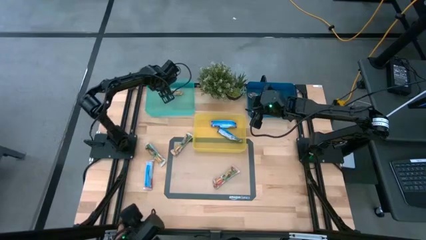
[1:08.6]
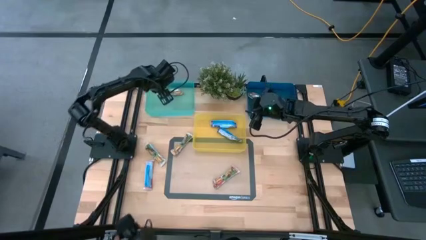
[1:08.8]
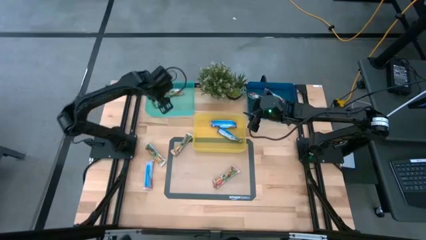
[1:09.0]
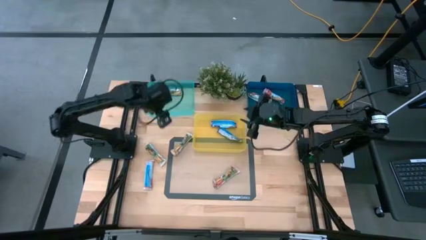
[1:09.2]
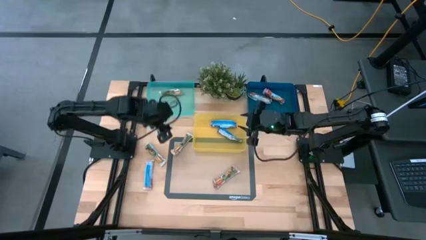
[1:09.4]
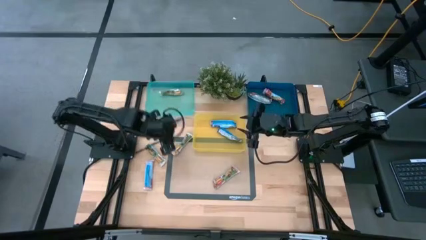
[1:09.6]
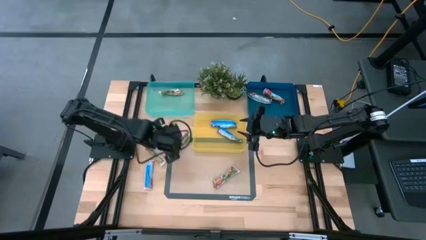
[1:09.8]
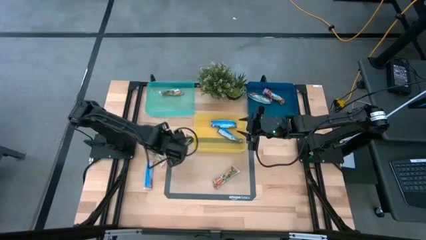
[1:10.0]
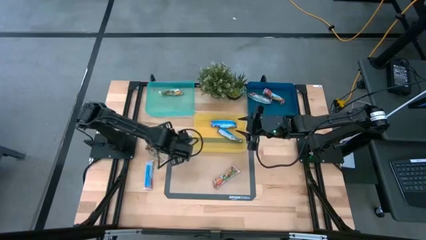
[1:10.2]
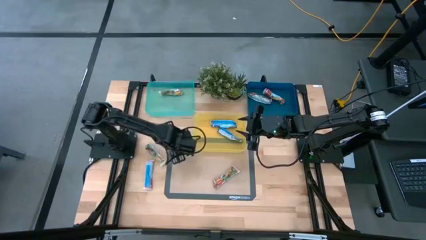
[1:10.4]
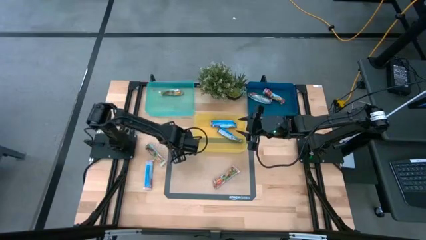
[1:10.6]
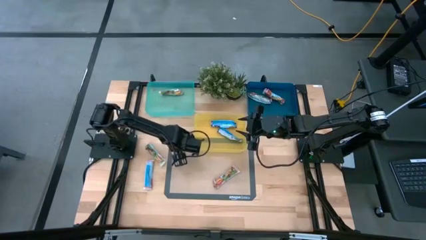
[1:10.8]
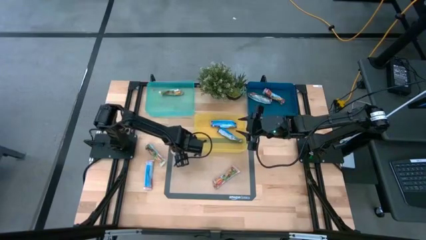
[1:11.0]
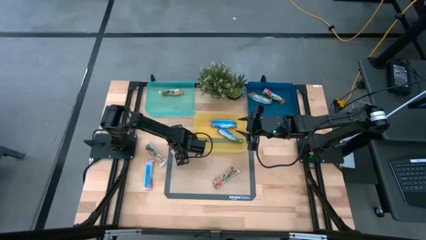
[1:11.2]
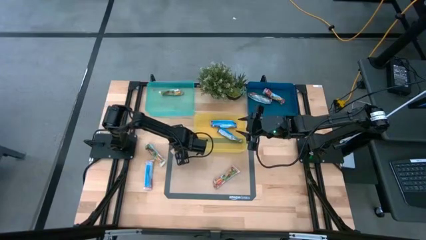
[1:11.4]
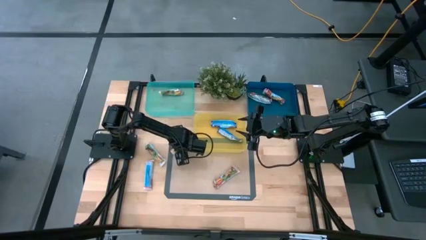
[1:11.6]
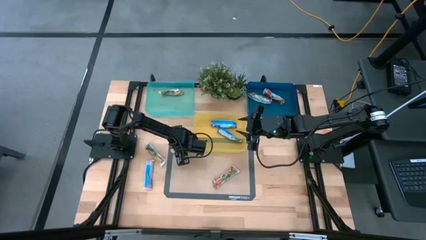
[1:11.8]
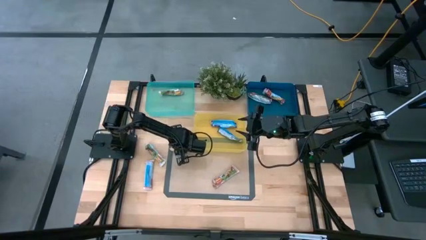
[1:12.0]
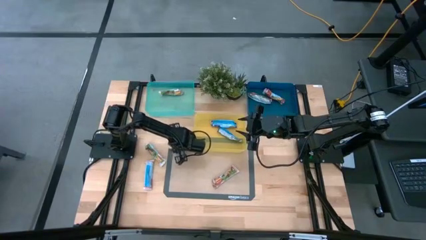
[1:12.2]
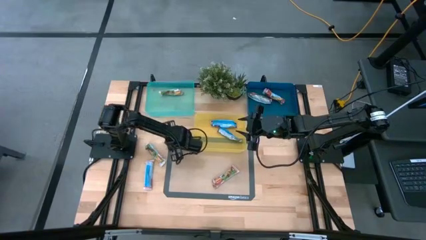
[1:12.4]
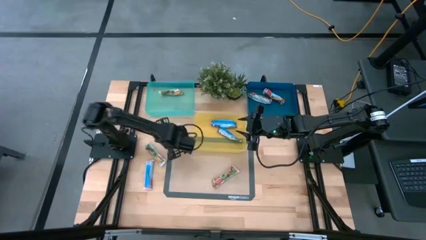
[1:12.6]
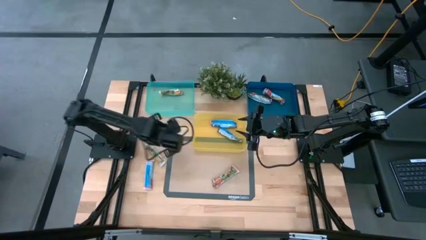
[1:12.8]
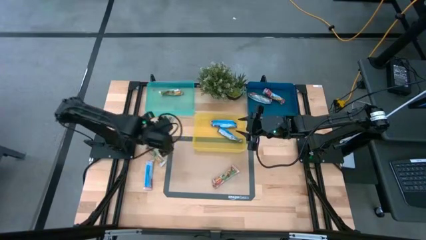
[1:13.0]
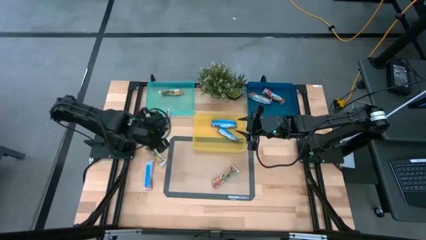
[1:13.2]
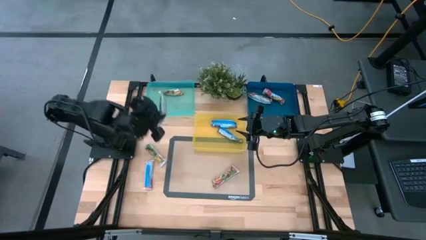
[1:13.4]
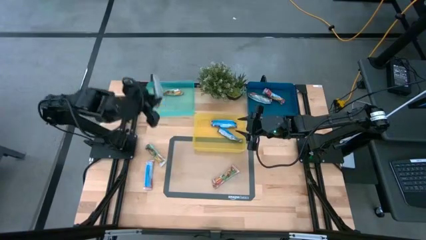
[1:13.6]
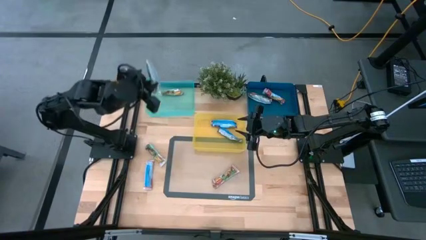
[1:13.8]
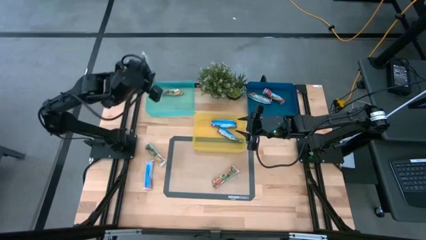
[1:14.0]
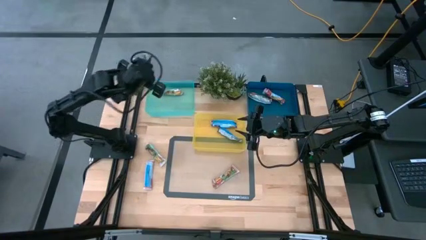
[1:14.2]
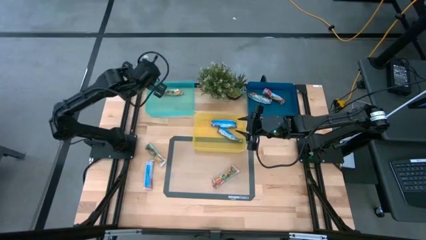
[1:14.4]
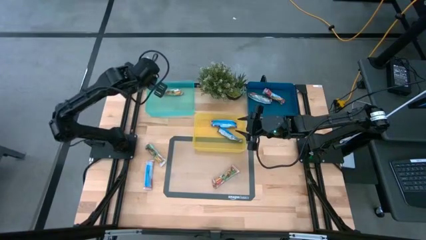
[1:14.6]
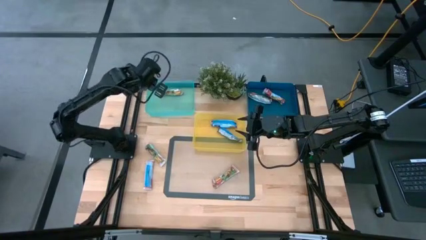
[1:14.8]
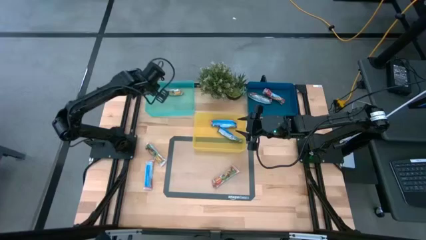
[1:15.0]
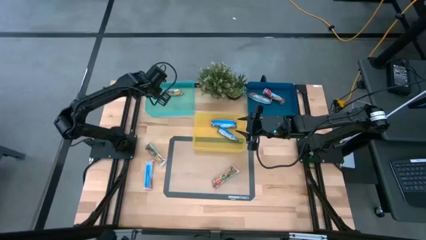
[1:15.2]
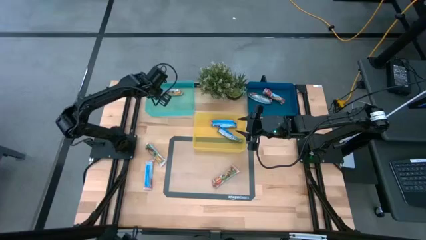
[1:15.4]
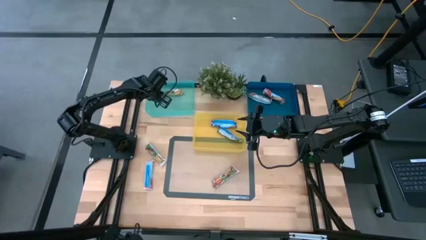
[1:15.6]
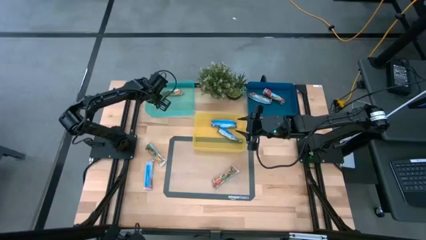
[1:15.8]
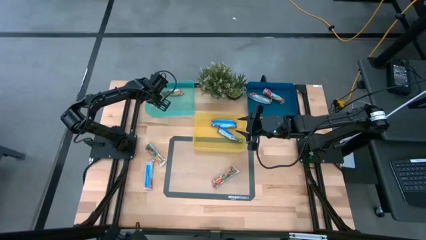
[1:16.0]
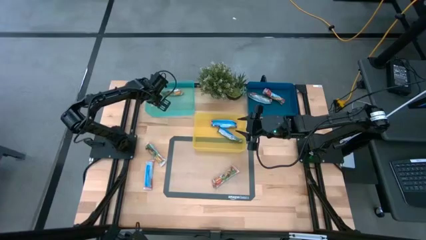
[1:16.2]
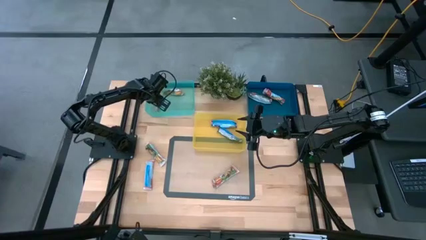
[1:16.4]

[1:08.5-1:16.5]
Task: Pick and place Granola Bars by type
Put the orange granola bar into the green bin

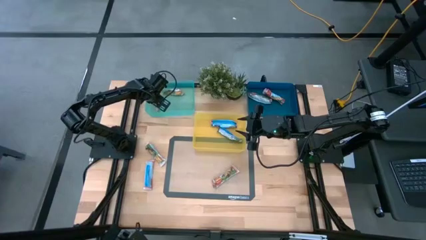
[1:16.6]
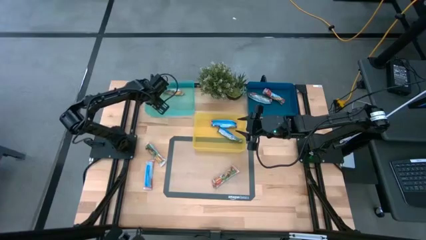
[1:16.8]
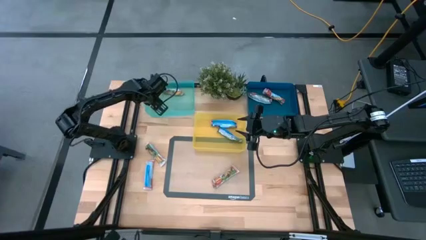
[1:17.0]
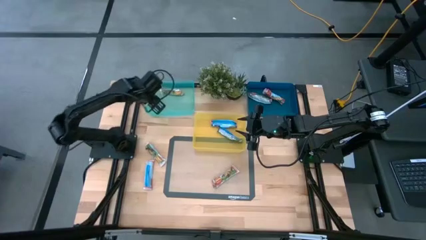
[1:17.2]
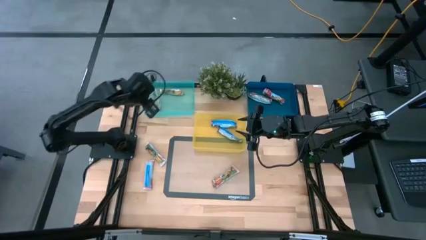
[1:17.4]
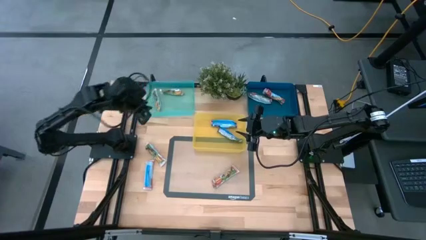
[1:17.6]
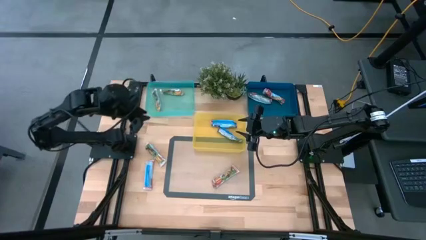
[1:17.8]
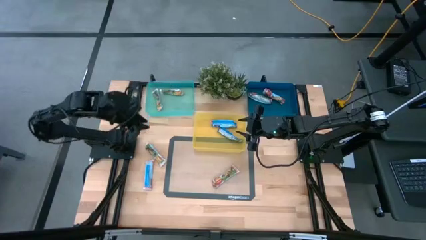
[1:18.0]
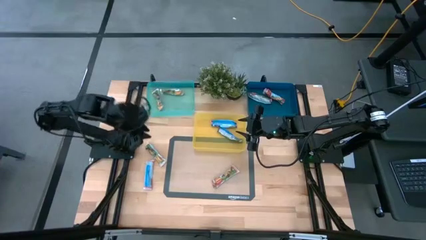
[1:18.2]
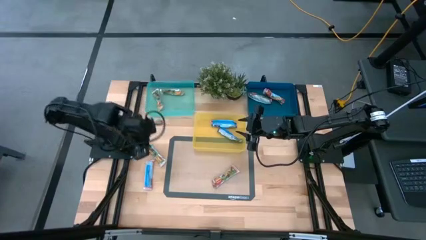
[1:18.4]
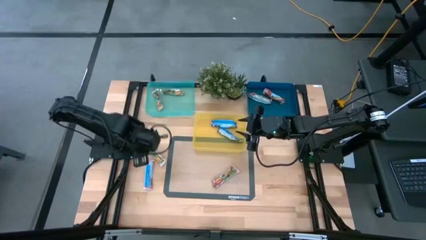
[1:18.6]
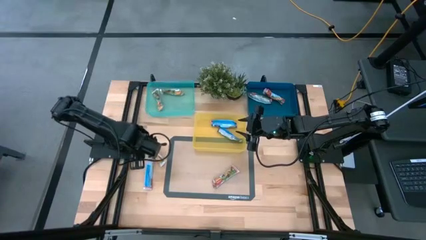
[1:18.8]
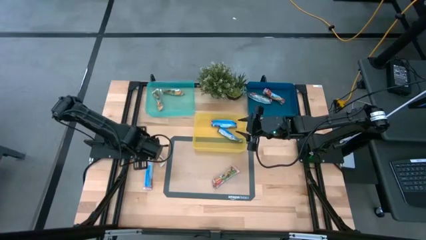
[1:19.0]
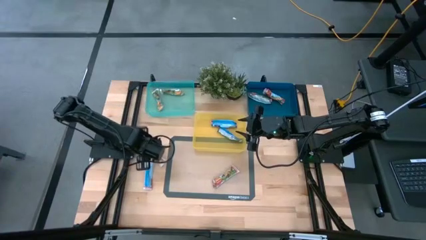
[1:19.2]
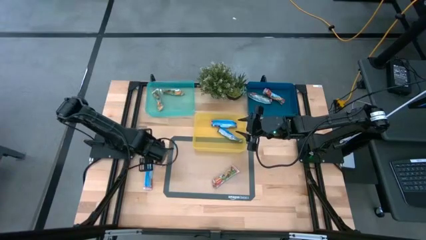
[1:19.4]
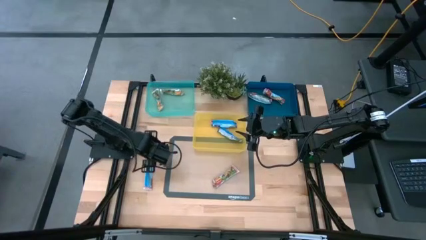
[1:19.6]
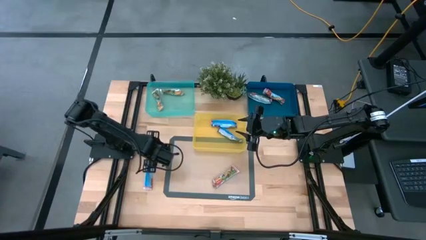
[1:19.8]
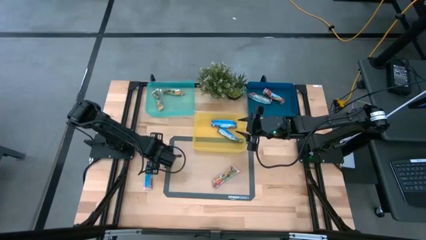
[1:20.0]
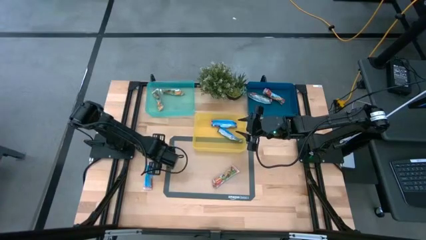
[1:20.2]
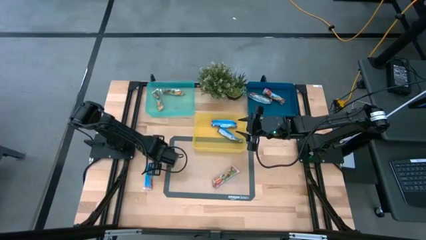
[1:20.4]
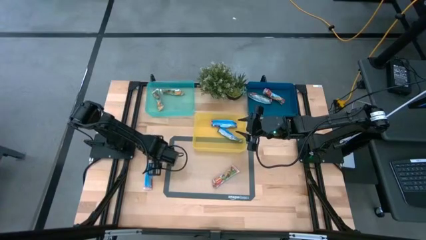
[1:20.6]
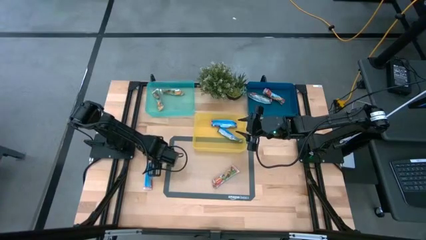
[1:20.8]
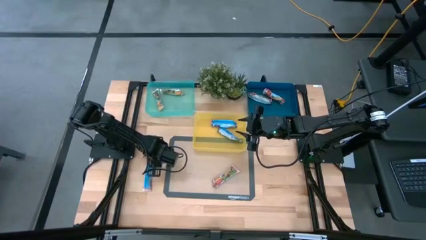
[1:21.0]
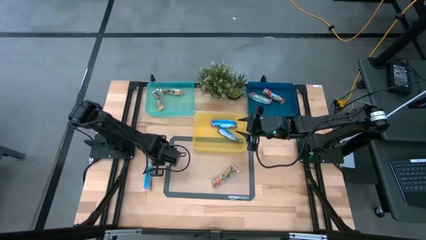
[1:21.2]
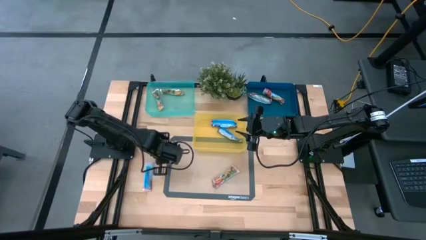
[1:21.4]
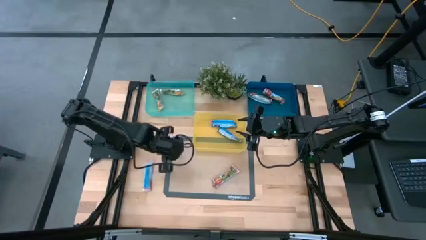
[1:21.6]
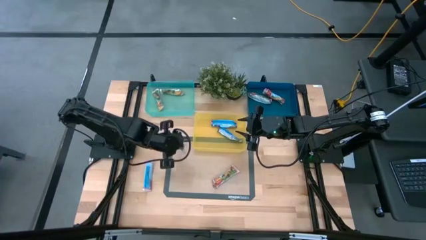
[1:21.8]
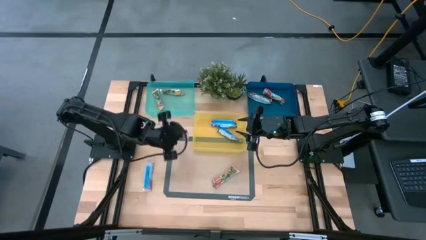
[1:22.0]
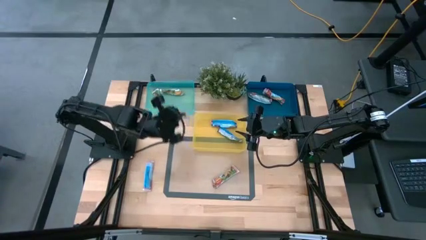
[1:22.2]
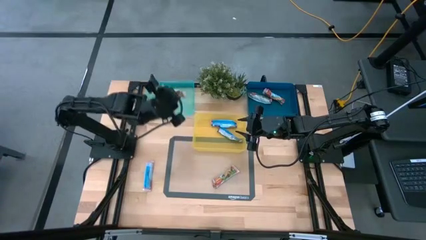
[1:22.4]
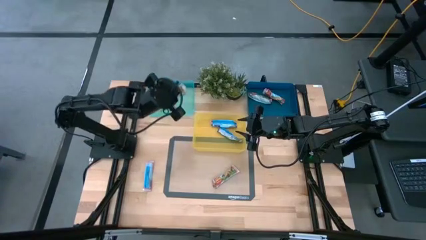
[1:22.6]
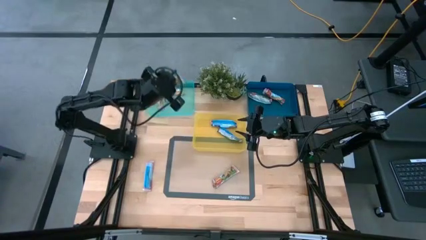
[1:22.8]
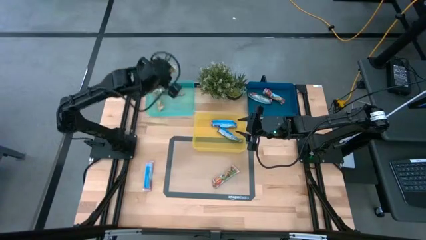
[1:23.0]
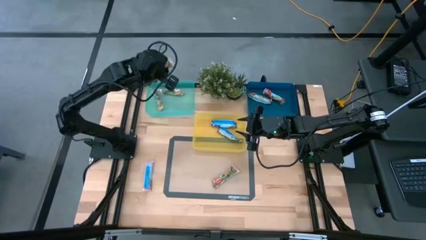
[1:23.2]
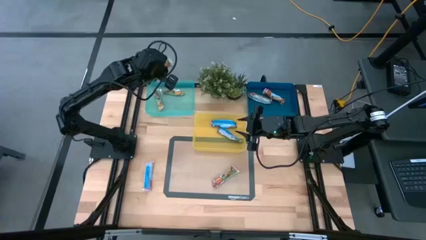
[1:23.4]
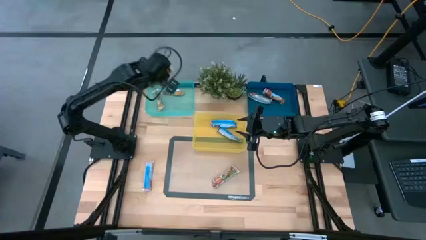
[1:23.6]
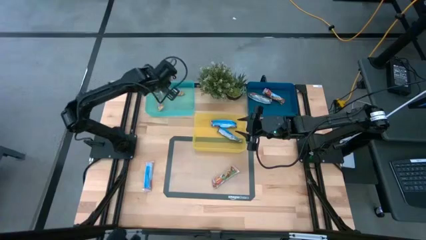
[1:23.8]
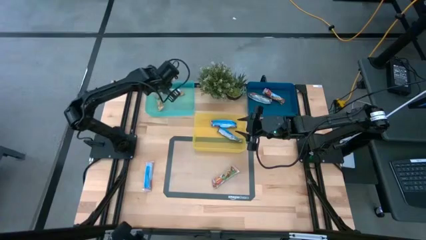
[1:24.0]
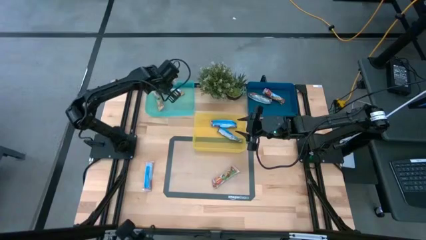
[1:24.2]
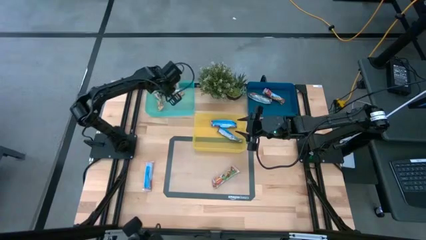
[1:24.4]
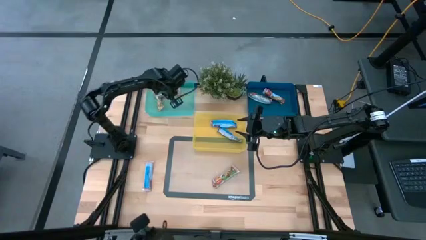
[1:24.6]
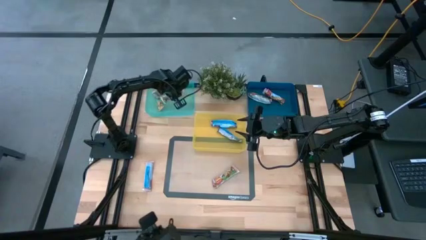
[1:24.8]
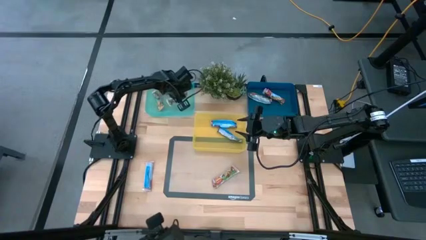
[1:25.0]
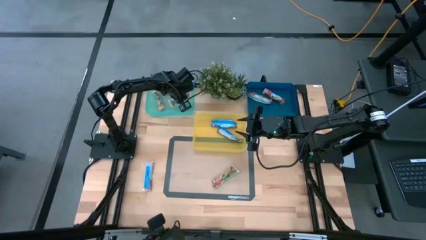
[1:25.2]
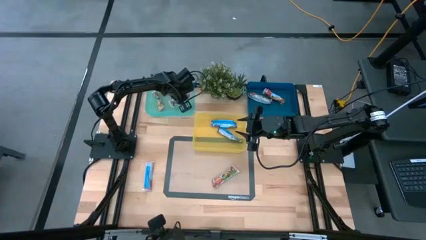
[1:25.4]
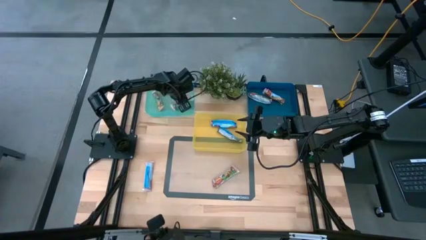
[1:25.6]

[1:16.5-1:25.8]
Put the orange granola bar into the green bin
